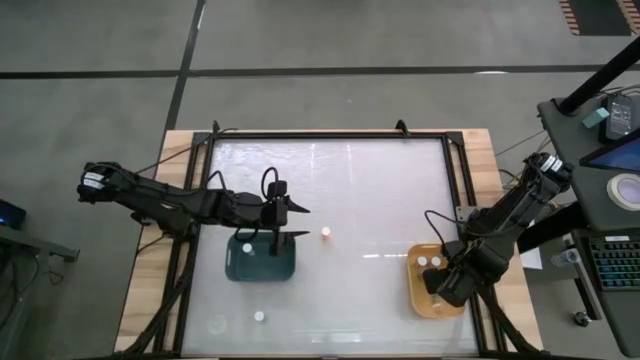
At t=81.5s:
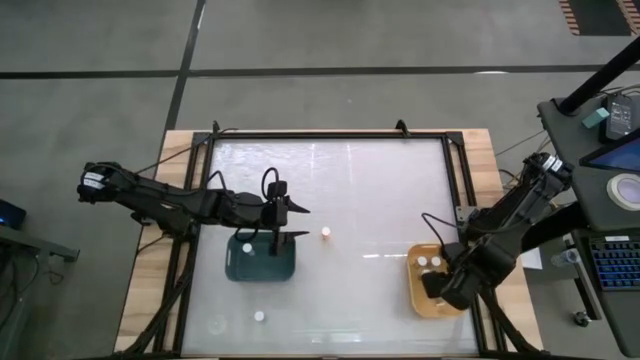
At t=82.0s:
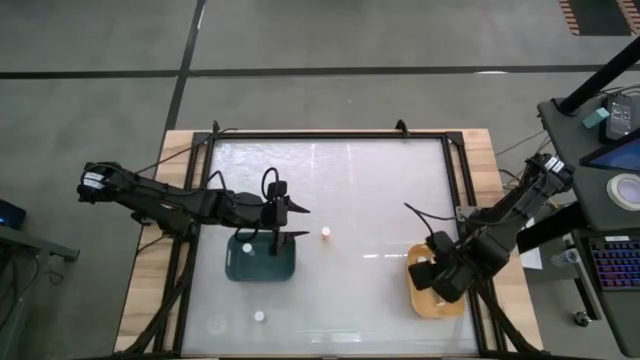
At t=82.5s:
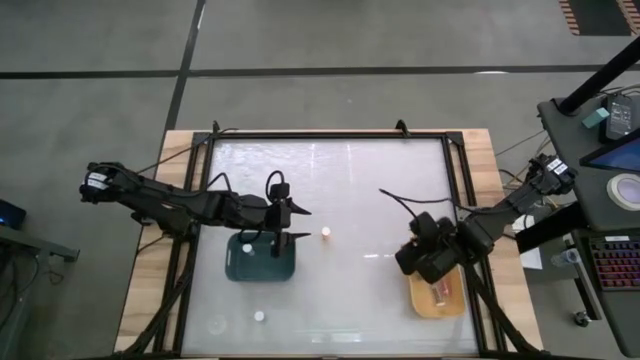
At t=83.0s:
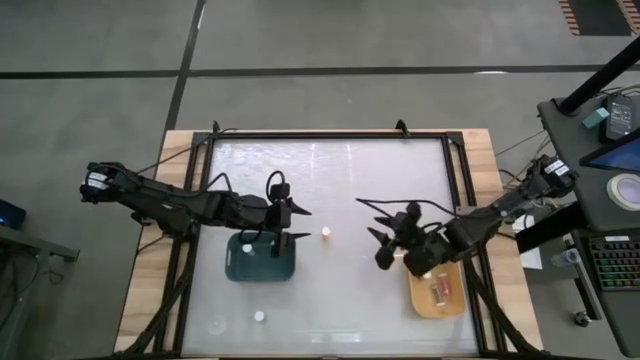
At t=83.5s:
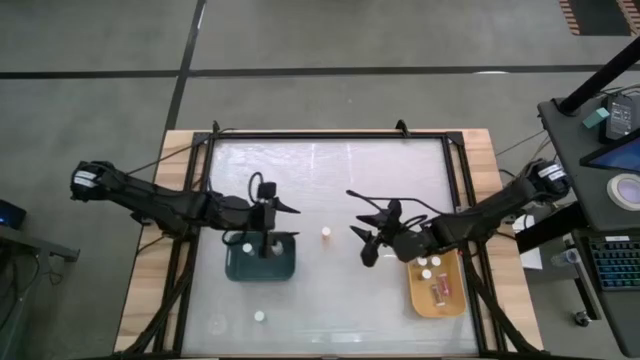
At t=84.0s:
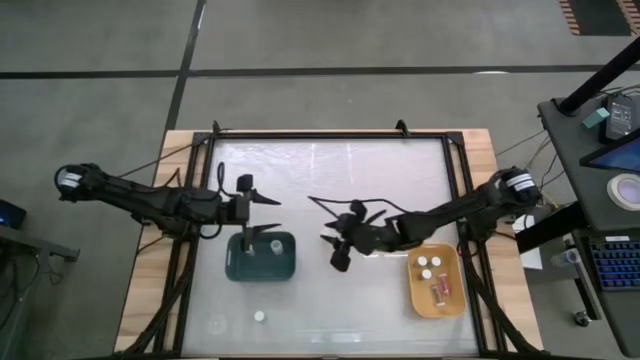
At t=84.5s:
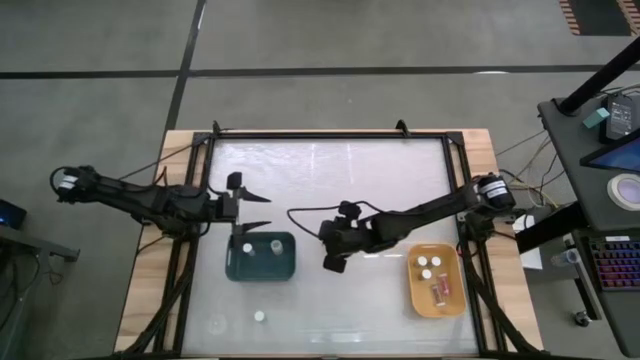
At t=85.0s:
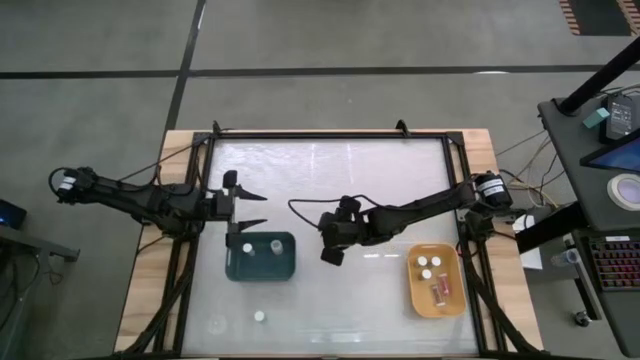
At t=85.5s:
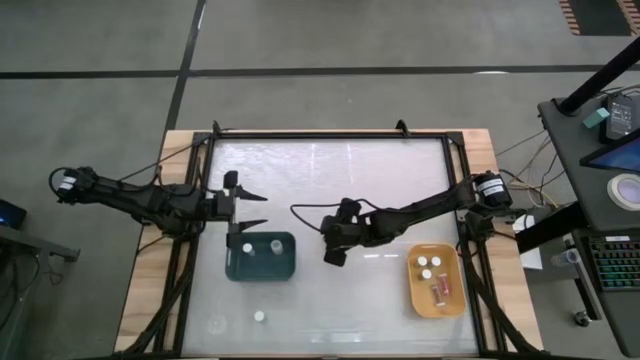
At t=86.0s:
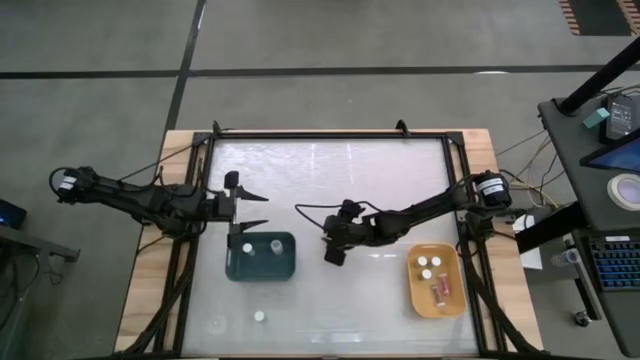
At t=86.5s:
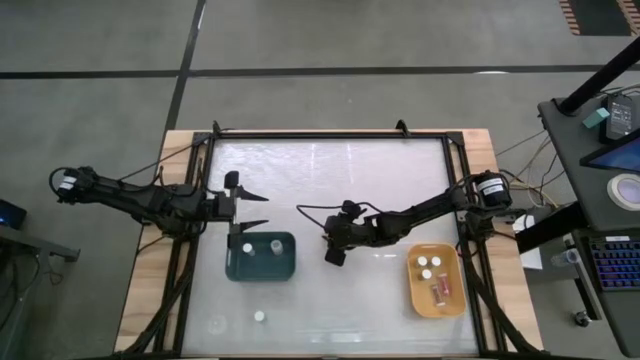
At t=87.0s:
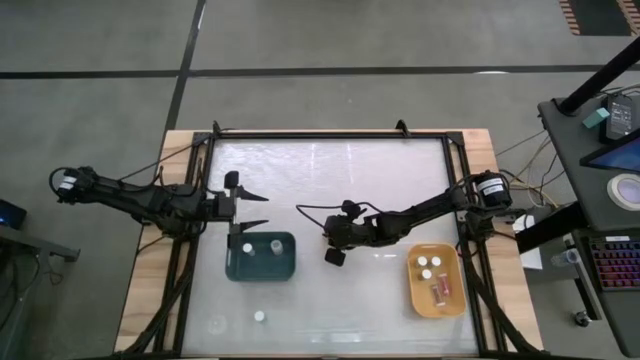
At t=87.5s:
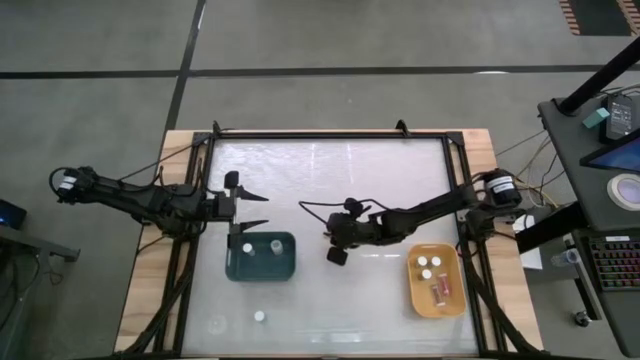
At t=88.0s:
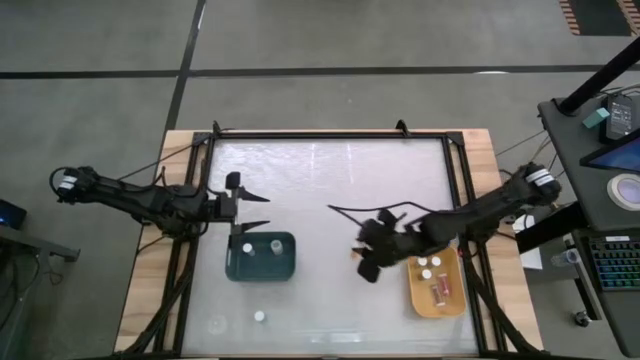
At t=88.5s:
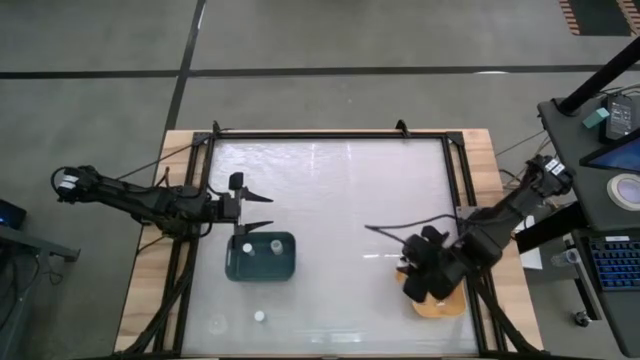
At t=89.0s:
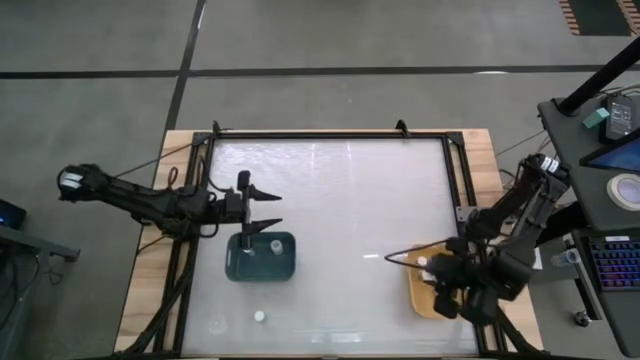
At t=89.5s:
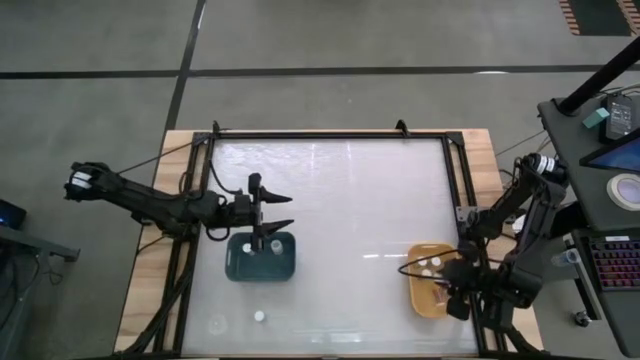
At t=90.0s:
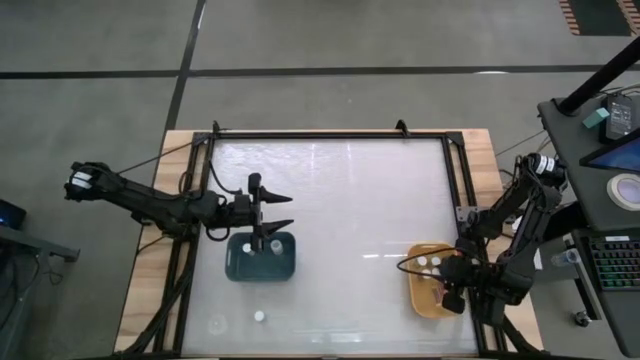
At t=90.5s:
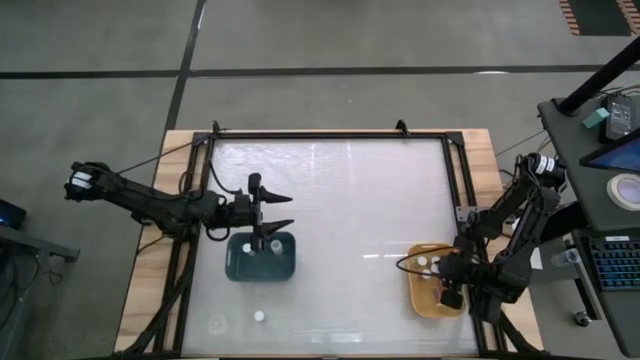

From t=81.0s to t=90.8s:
Task: Pick and place medicine bottles into bin by pill shape (circle, oval)
Put the orange bottled capsules into the yellow bin

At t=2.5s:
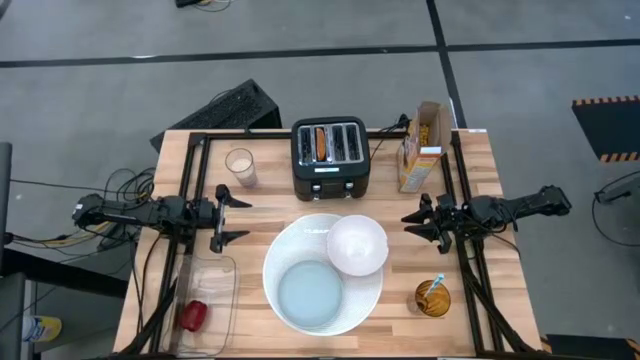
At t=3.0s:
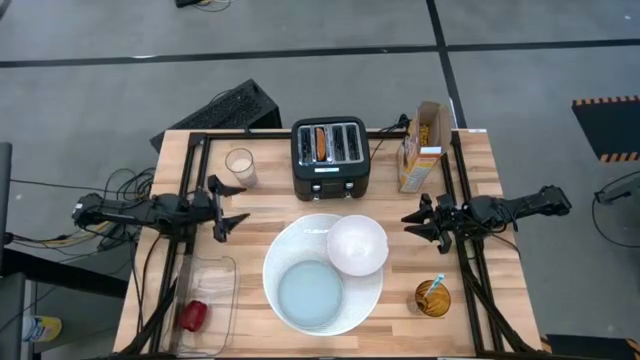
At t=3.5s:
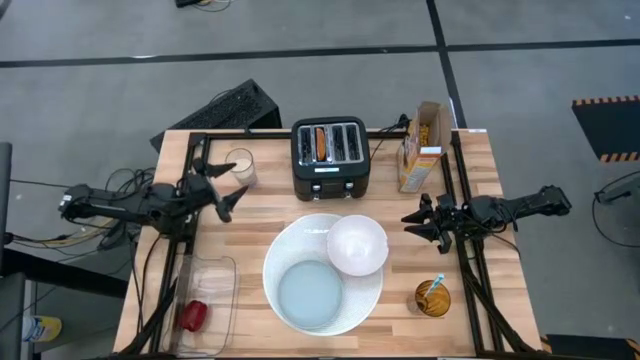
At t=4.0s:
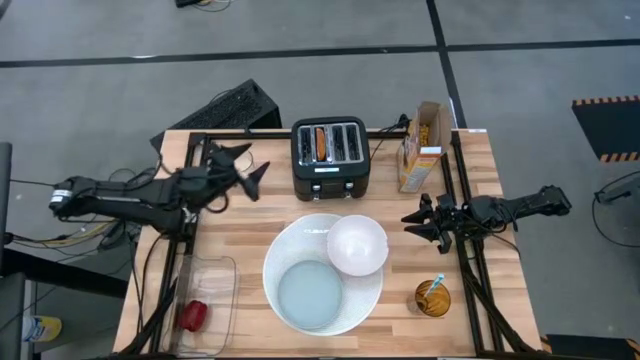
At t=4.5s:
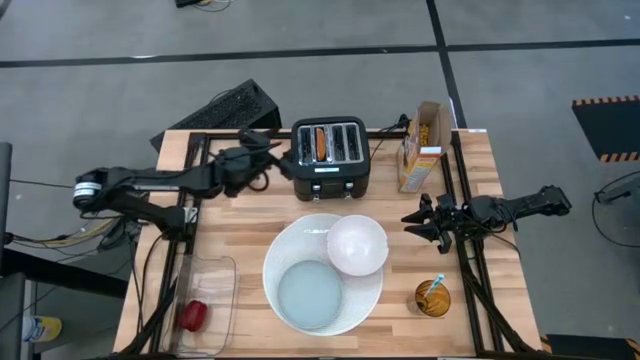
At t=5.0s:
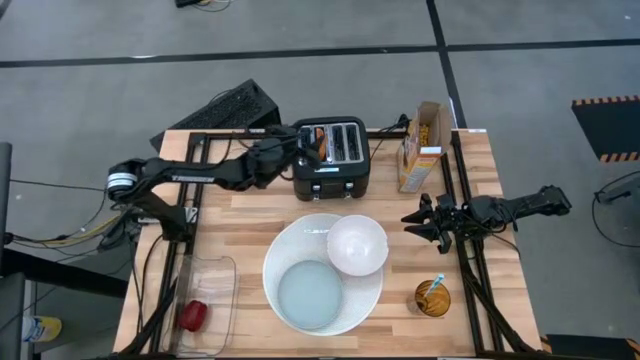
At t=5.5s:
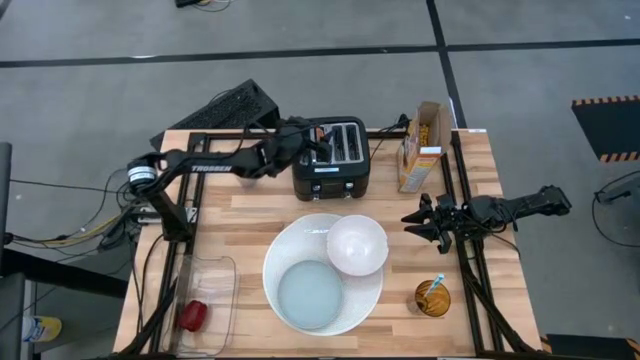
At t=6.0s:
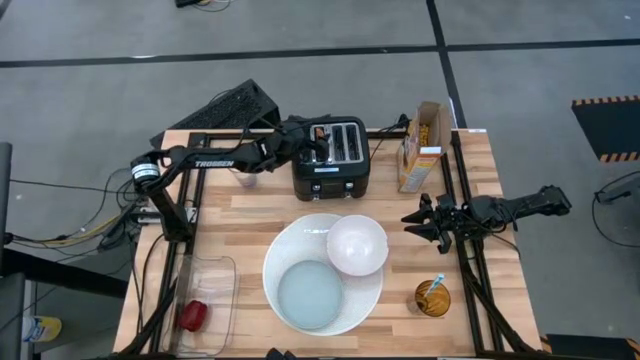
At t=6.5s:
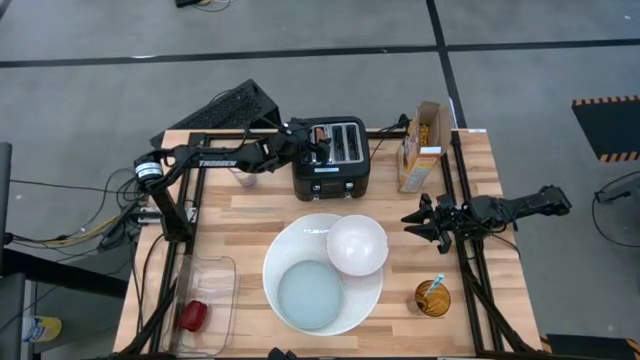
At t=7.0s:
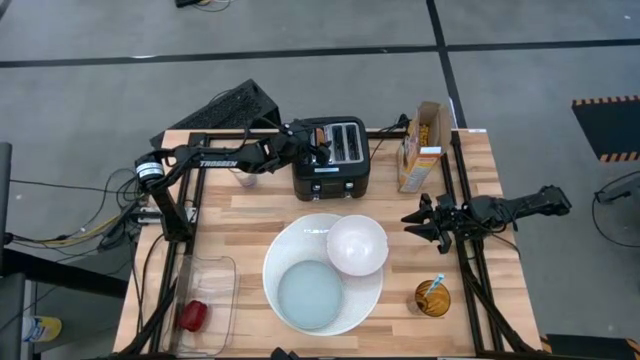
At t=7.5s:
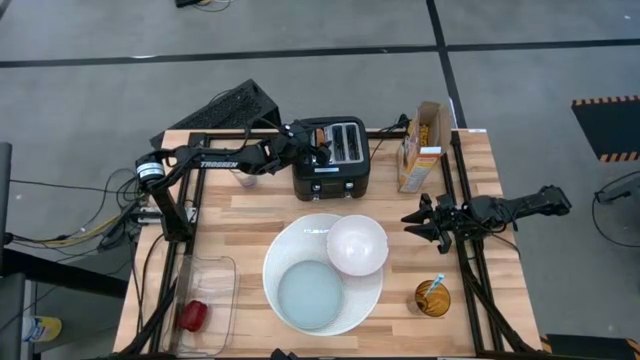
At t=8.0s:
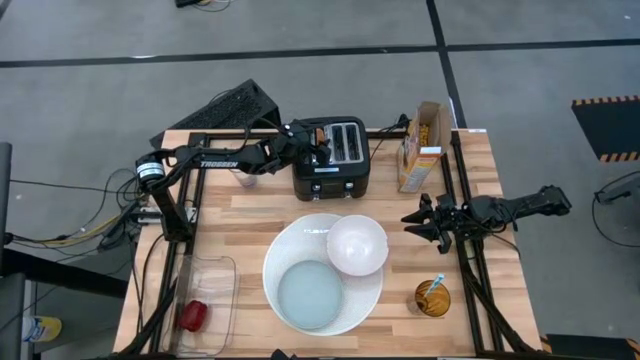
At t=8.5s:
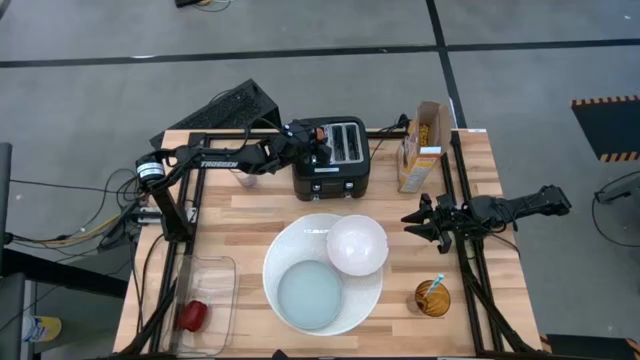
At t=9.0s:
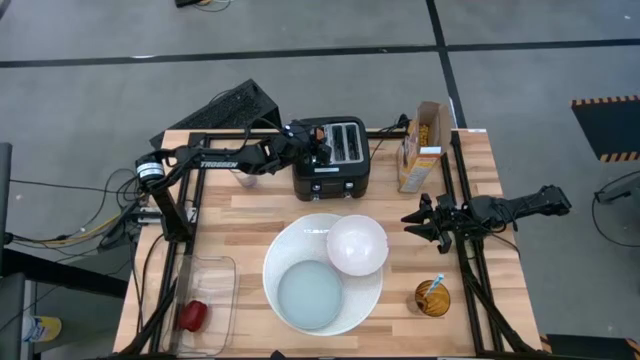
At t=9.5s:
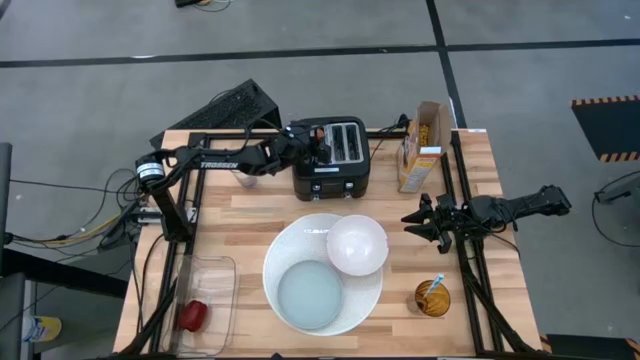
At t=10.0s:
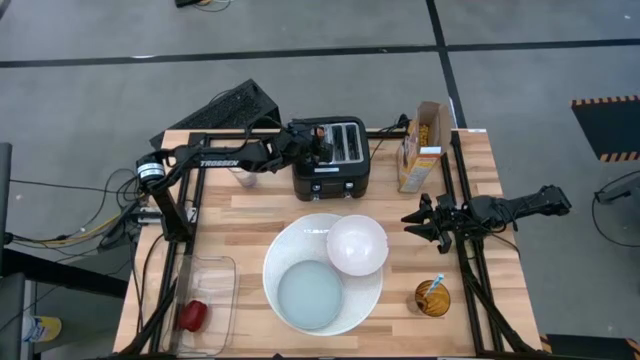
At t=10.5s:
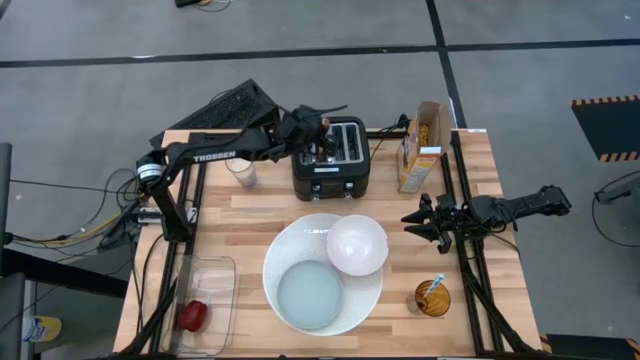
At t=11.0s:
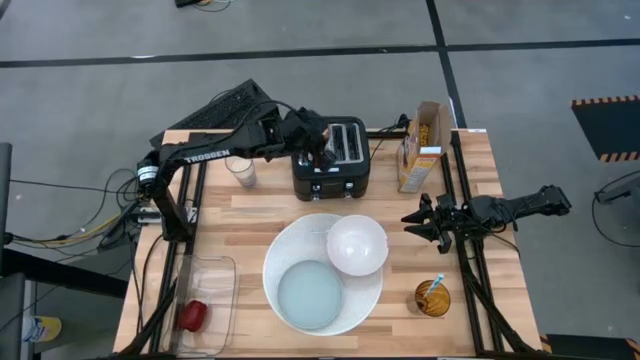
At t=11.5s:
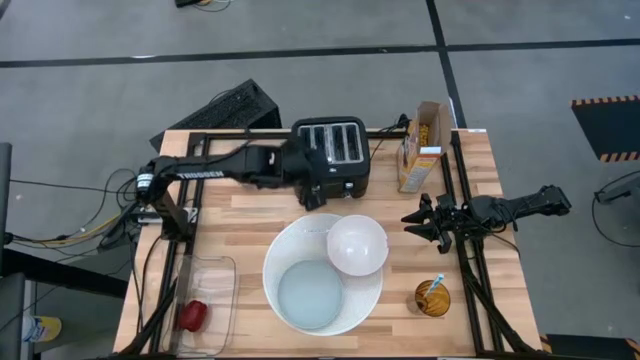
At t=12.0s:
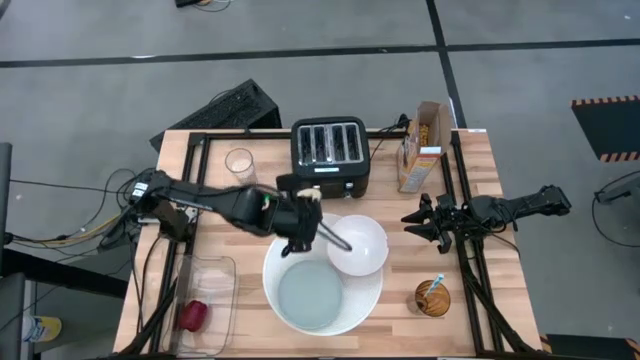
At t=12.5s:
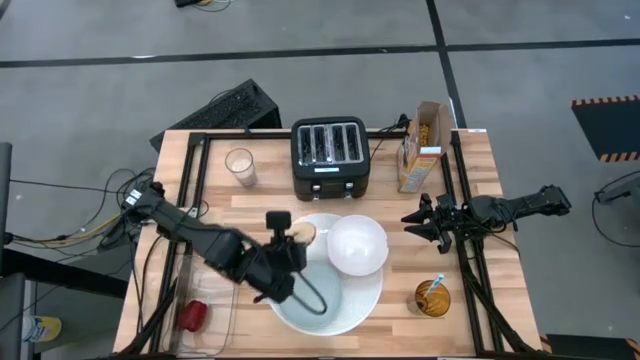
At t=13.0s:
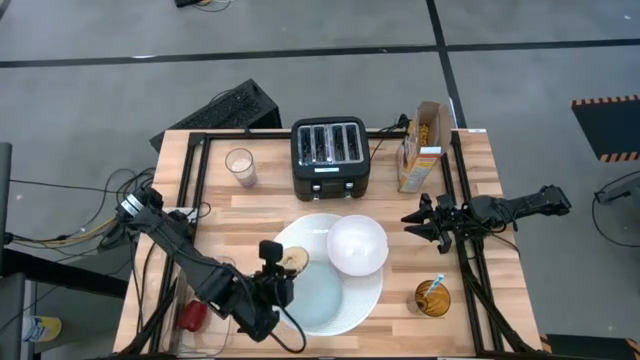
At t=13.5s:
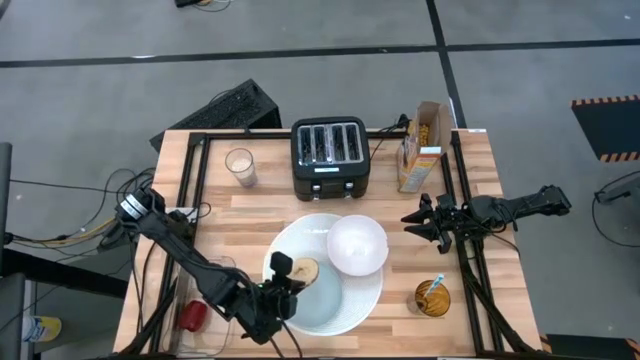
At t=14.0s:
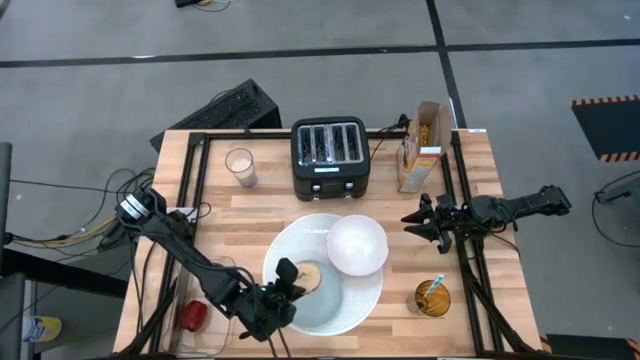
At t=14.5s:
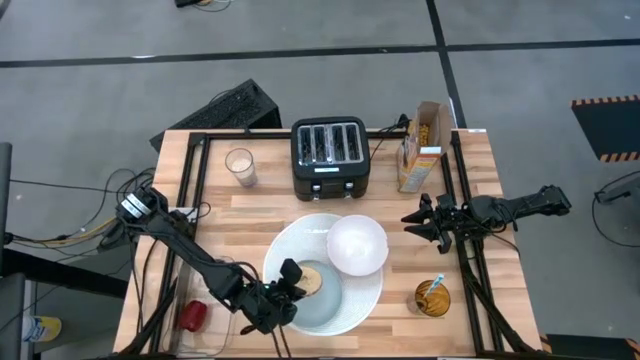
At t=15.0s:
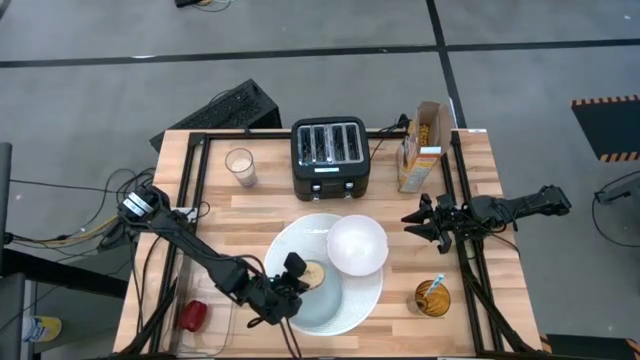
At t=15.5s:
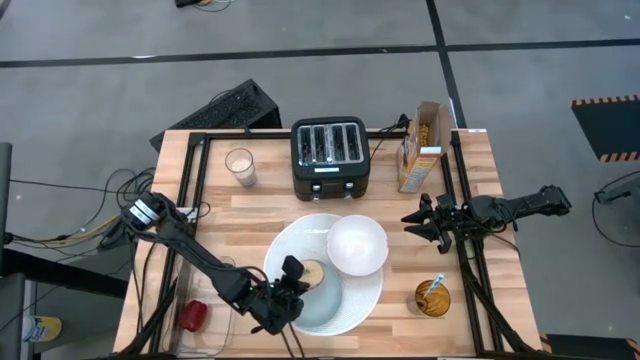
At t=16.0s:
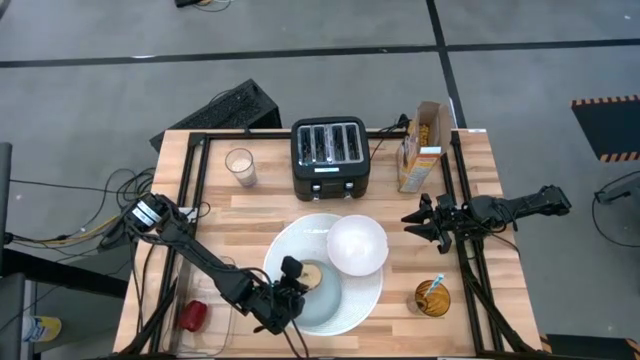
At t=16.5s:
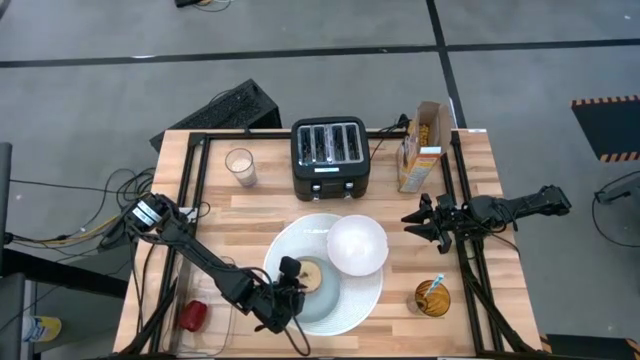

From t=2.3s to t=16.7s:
Task: Arrange a breakfast setting
Put the toasted bread on the light blue plate
